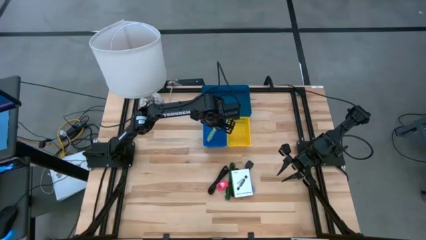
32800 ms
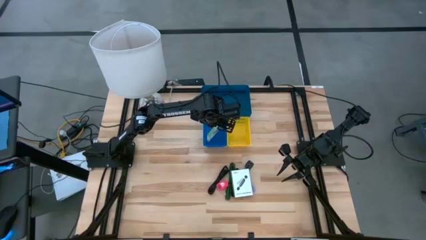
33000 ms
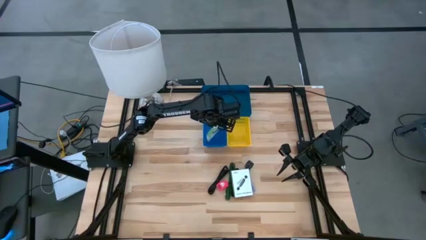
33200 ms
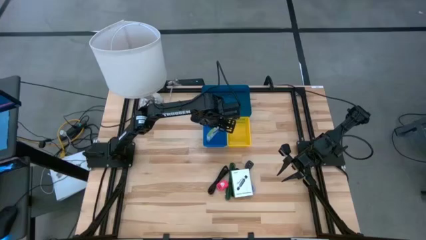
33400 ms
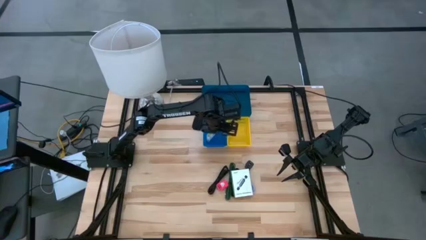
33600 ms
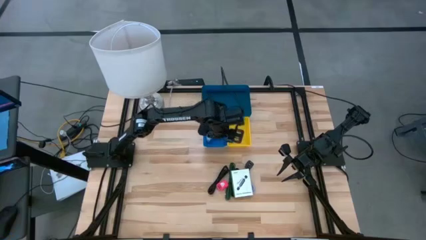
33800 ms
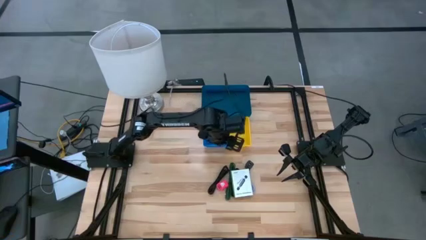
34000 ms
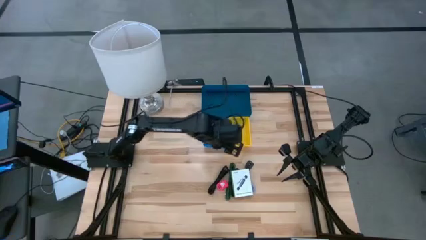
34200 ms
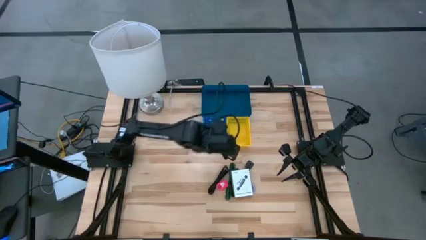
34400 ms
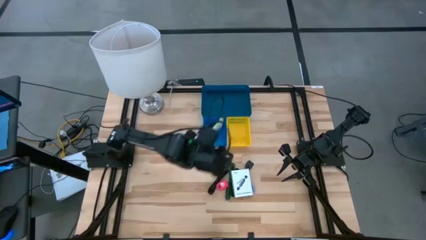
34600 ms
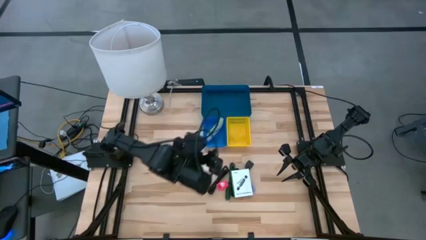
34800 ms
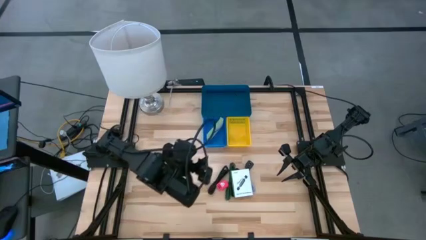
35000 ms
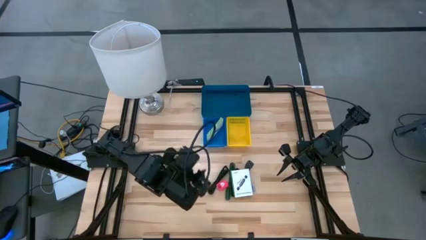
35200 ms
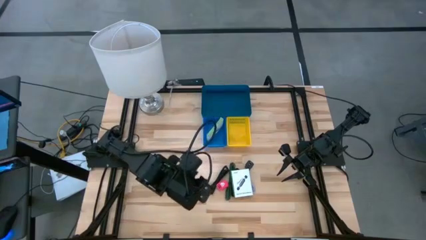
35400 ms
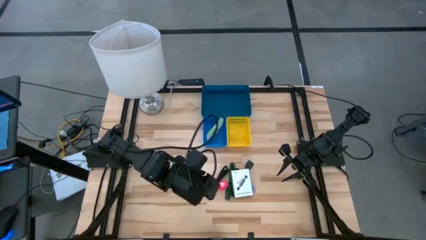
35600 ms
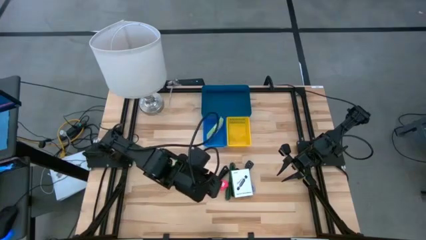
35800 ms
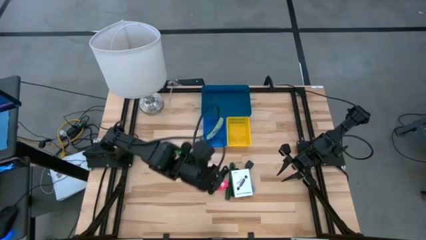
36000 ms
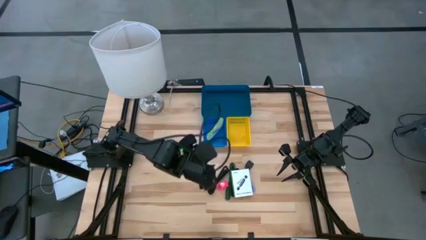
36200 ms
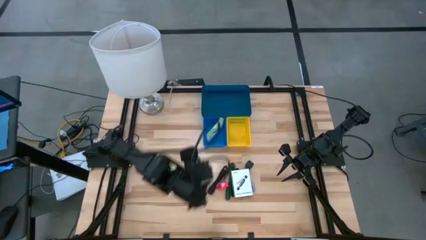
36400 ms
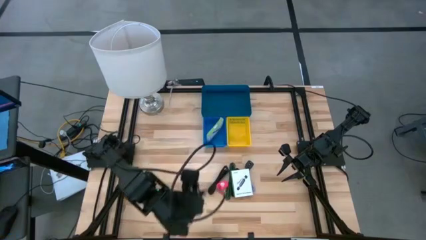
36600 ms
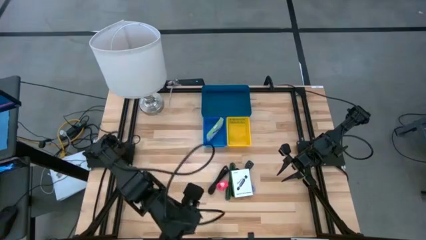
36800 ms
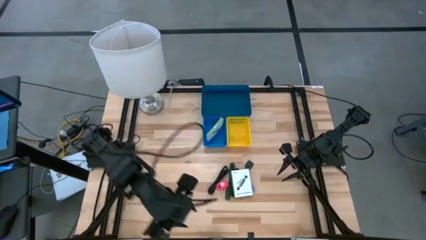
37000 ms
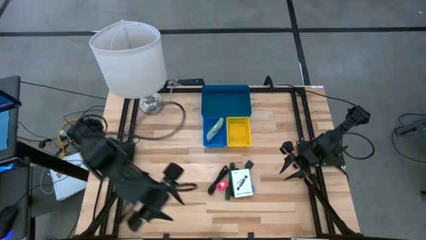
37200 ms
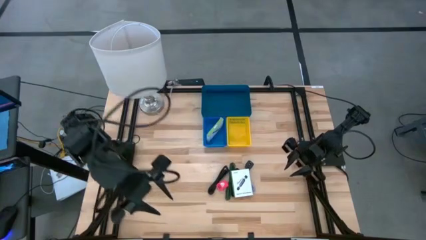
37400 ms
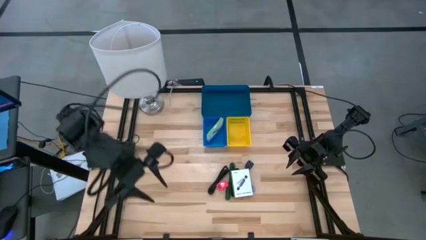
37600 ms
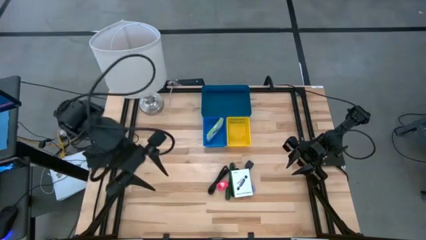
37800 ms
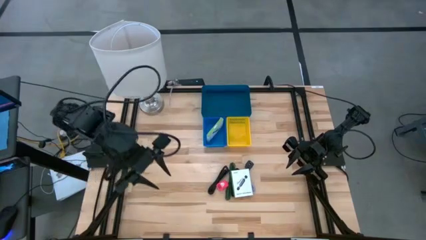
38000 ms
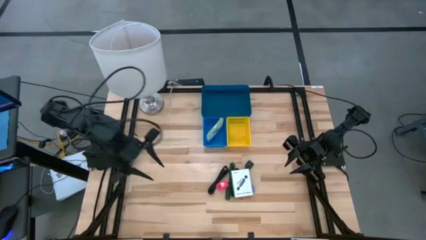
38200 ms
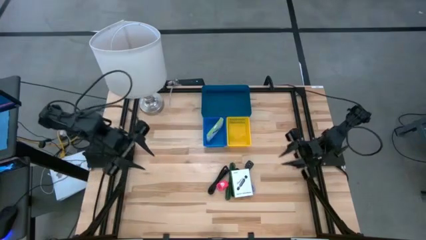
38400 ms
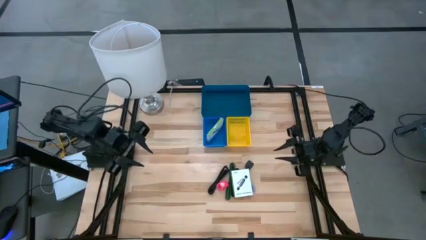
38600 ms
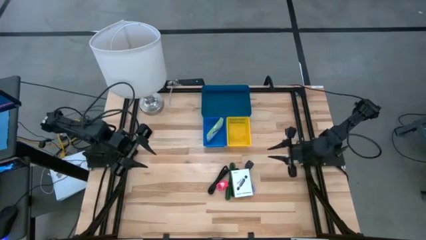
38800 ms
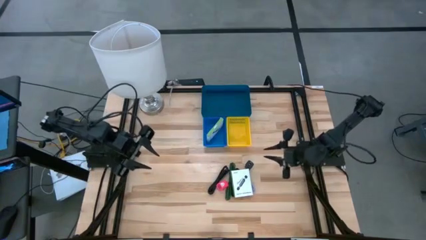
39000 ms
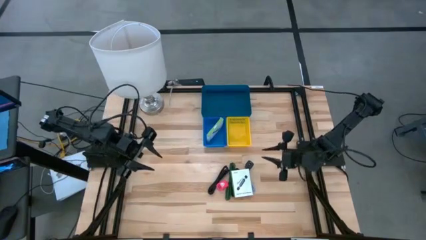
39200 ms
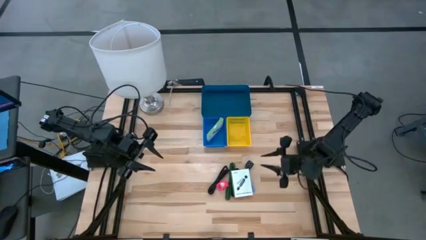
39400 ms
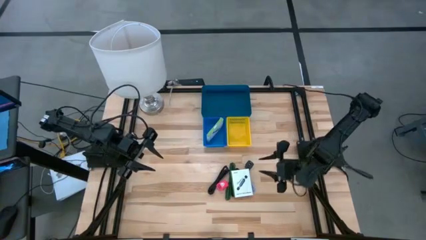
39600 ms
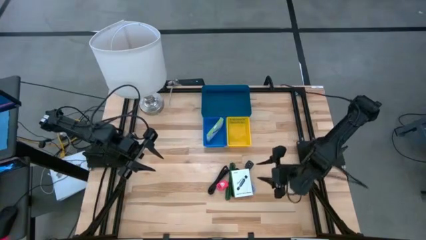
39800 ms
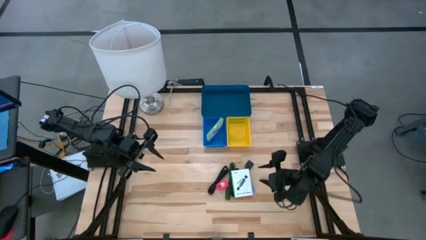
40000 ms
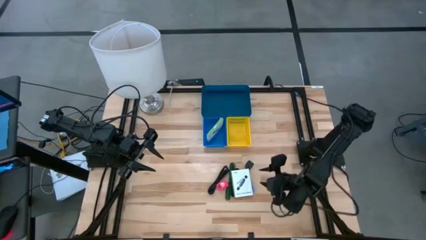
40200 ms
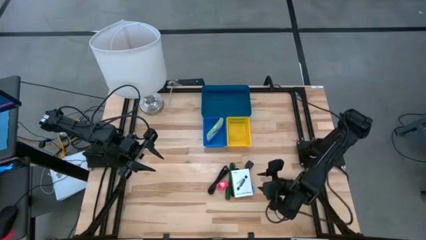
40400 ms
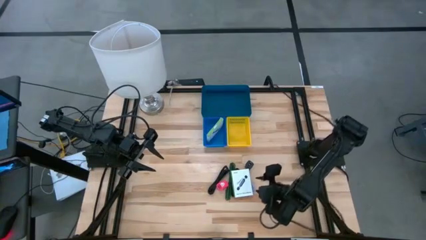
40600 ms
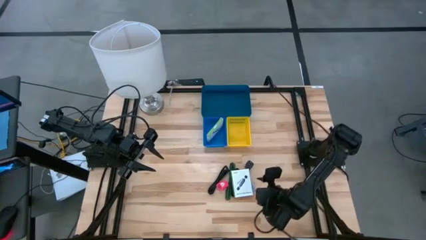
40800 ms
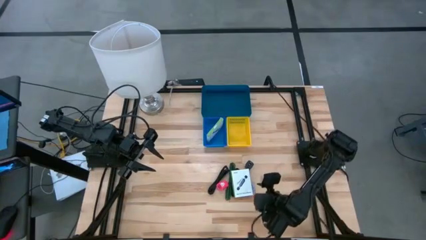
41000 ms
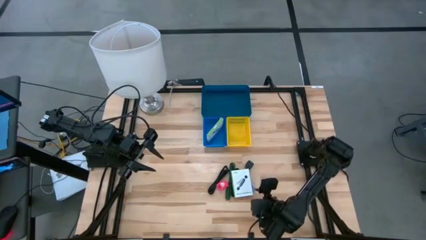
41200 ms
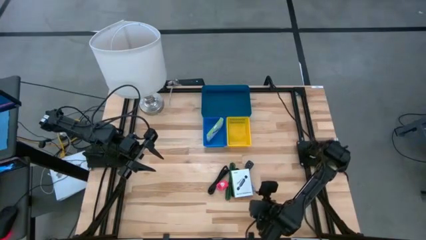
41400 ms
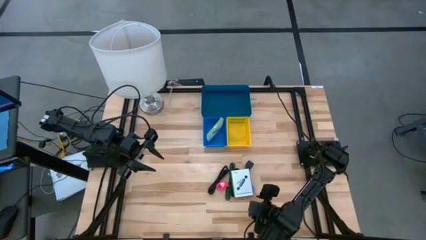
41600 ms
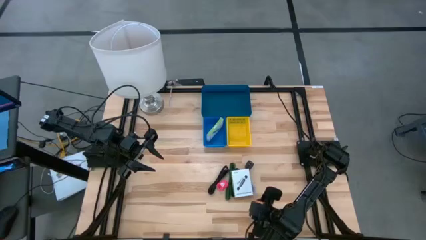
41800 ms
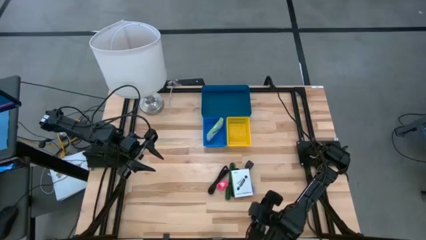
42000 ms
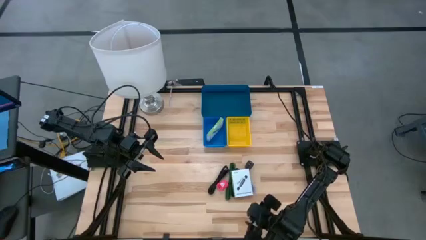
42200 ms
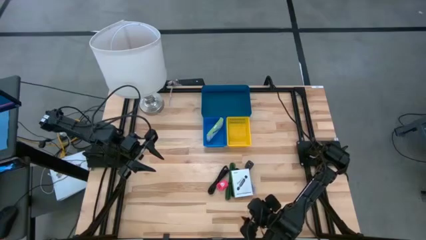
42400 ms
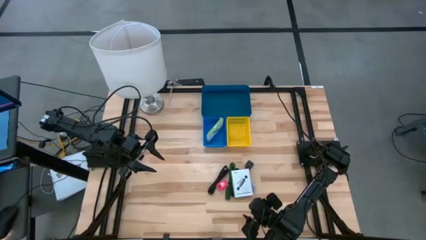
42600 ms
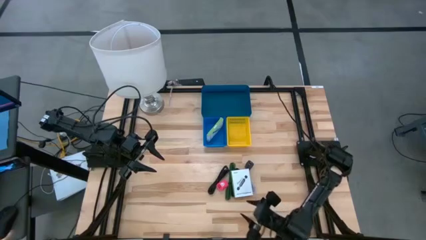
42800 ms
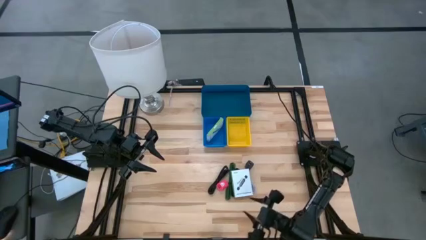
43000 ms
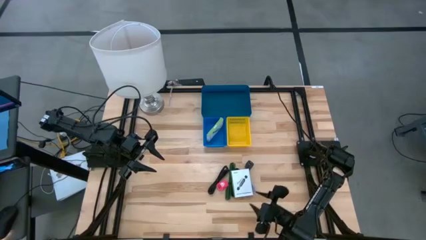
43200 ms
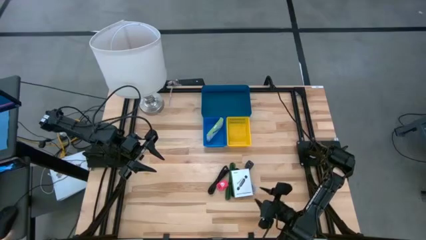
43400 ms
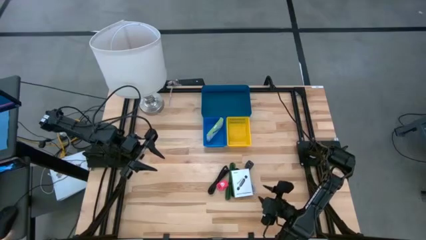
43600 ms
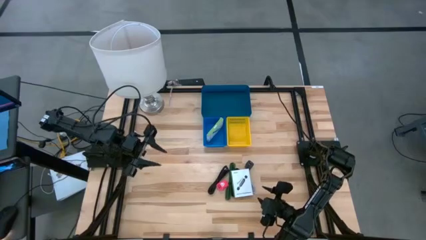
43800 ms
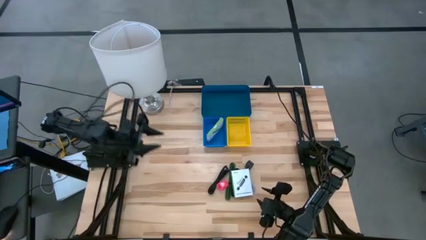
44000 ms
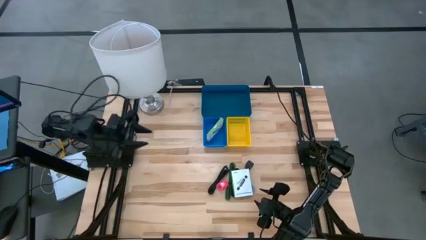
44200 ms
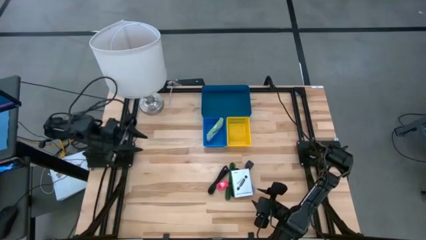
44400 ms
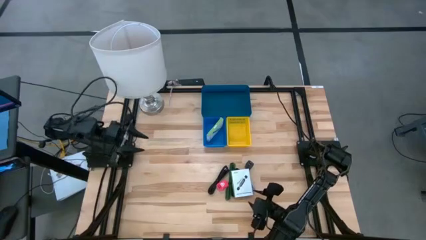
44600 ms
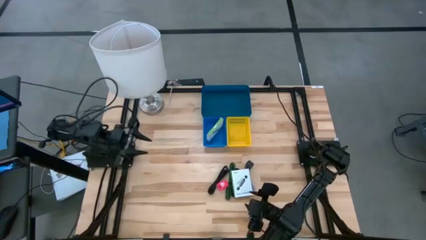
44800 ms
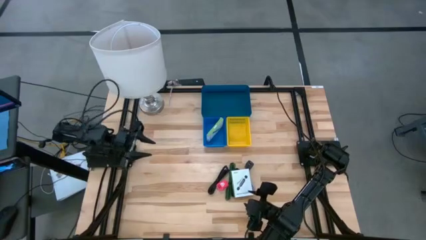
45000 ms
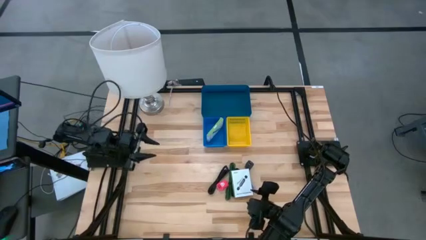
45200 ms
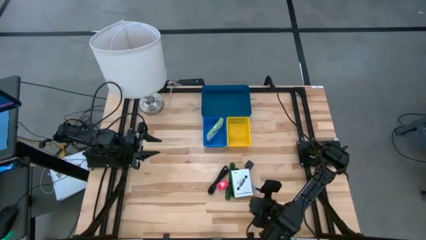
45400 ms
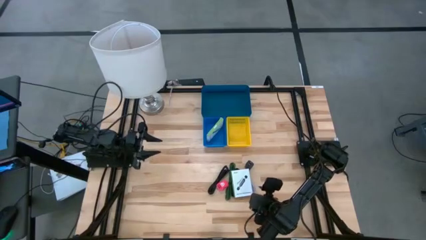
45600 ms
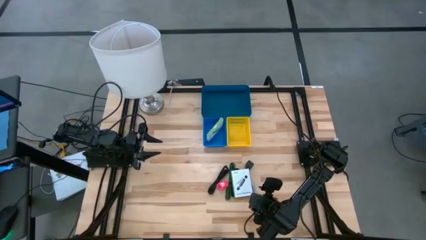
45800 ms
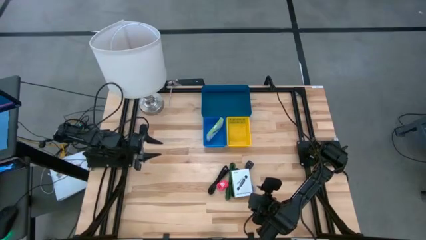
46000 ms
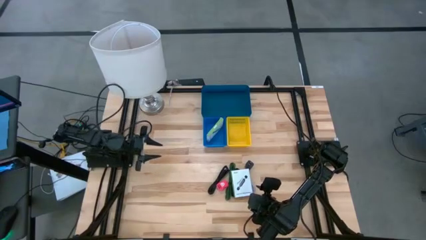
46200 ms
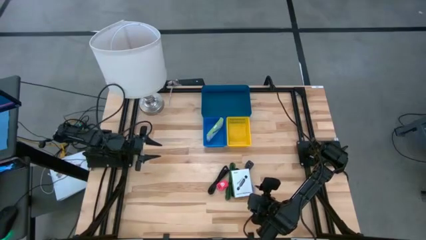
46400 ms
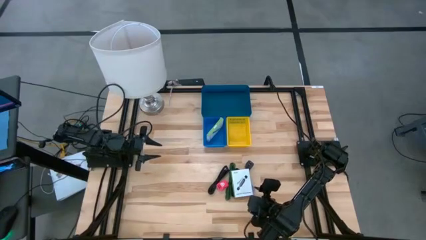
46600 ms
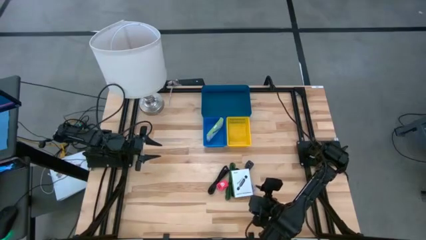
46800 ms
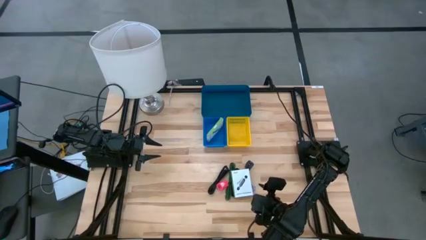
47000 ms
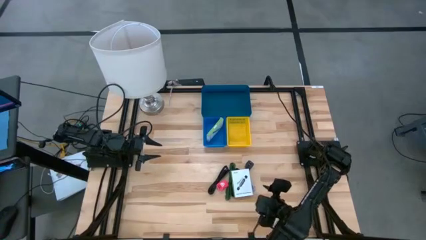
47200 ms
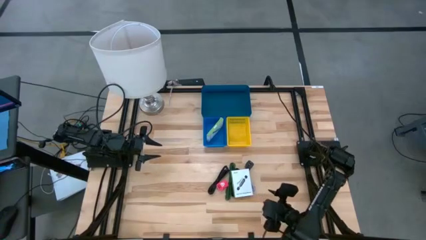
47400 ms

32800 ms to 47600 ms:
Task: Pick and place items into bin
Put the card reader box into the small blue bin

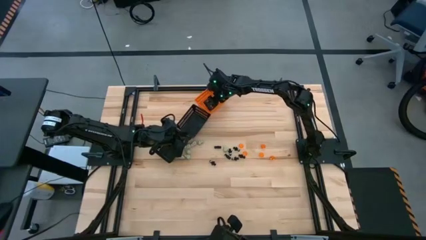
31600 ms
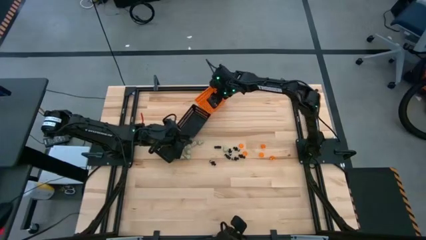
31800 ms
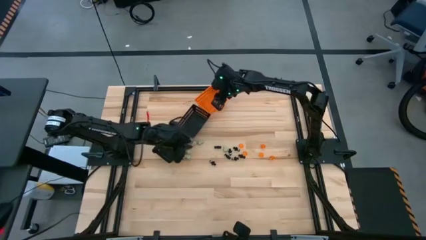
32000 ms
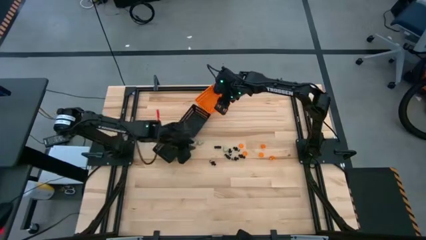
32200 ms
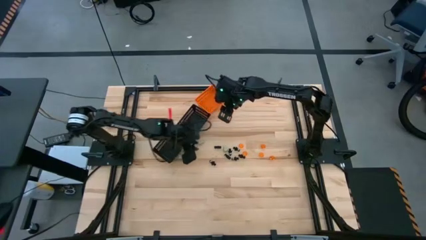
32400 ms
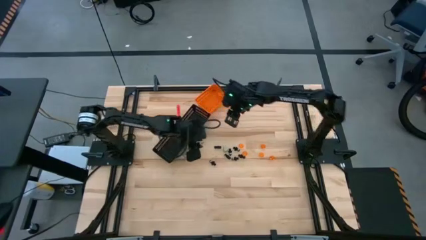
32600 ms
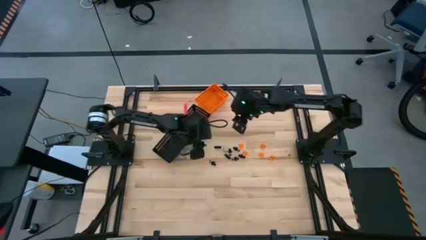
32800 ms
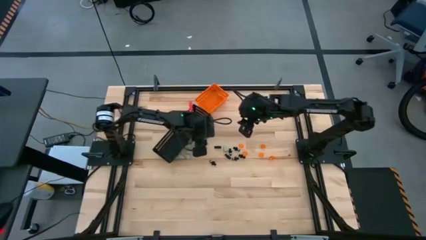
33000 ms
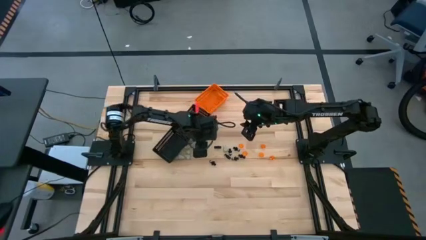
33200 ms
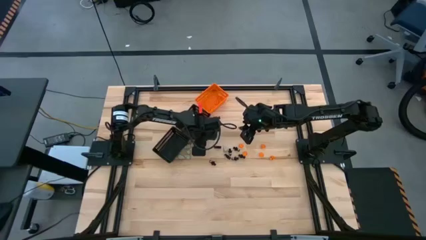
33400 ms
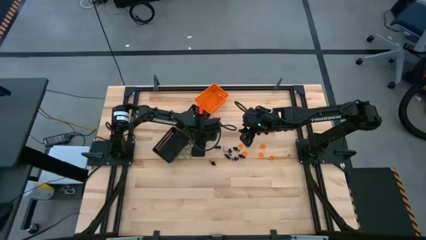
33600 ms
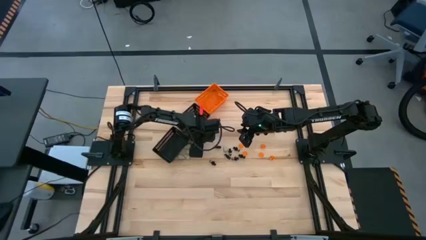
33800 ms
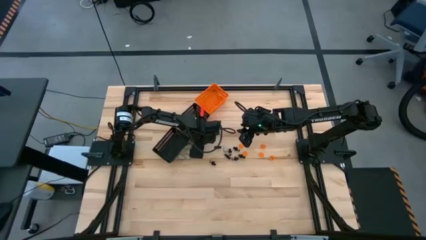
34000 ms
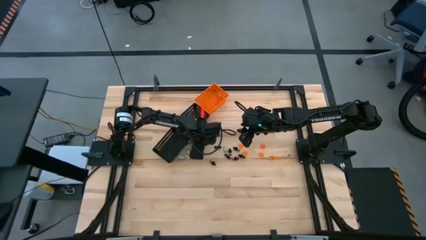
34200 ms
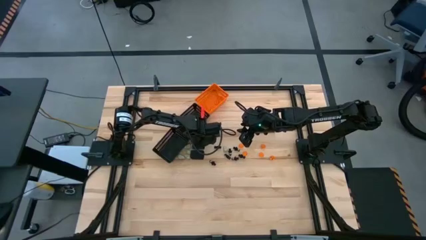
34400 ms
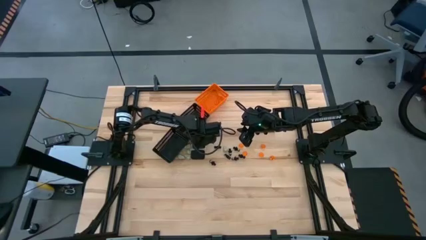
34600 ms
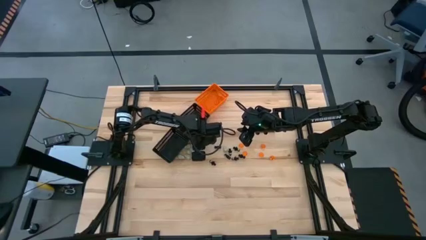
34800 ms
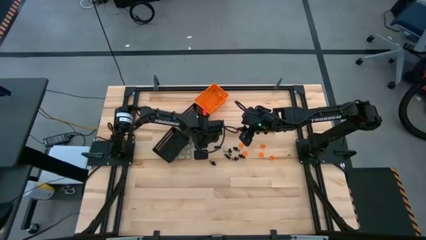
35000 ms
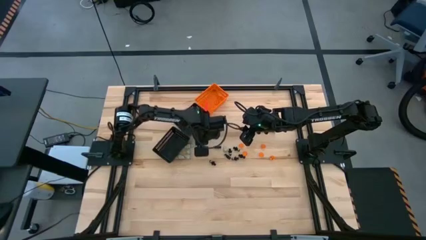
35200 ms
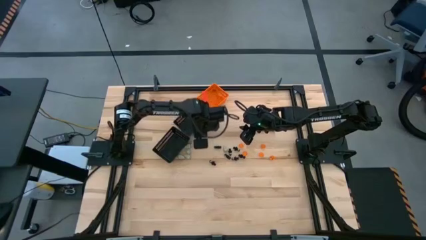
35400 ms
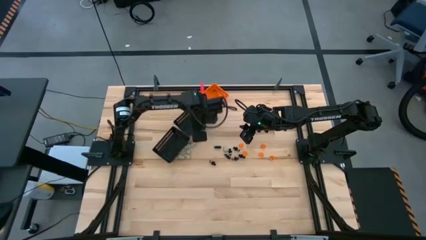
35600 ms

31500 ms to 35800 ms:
Task: Sort Halloween decoration
Put the white skull toy into the top black bin
